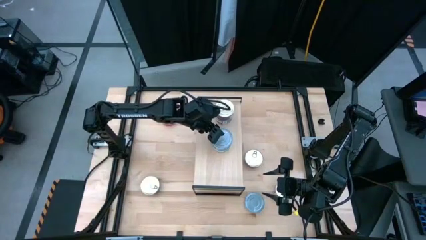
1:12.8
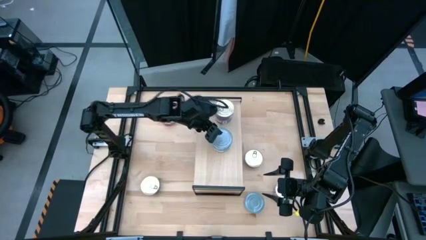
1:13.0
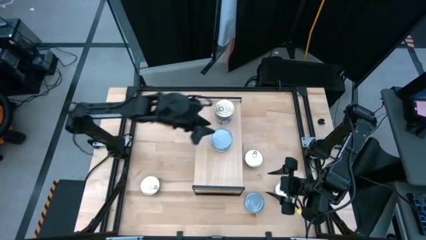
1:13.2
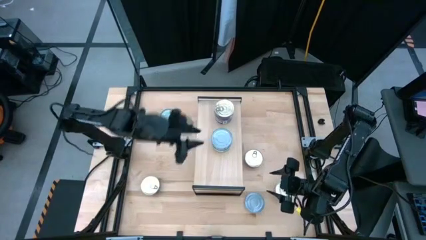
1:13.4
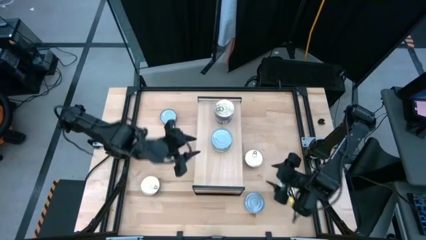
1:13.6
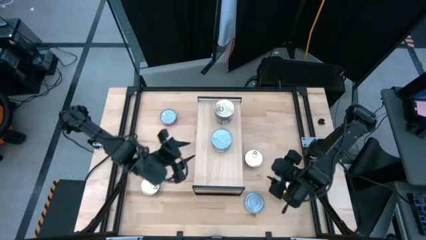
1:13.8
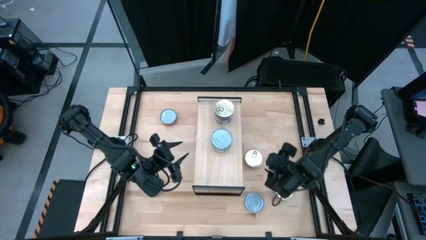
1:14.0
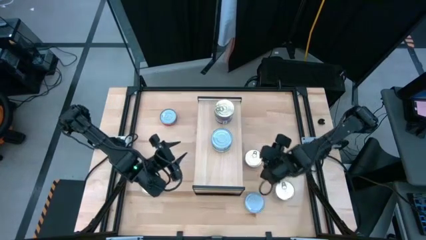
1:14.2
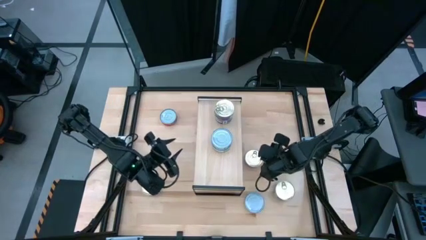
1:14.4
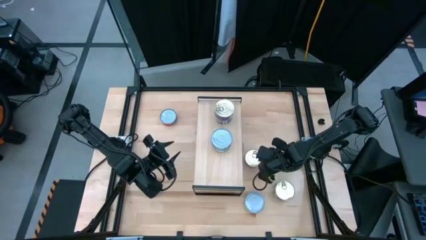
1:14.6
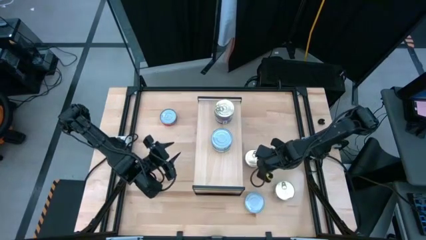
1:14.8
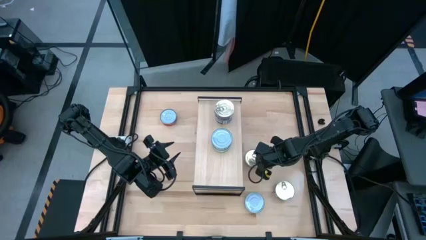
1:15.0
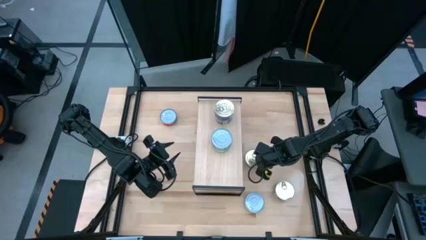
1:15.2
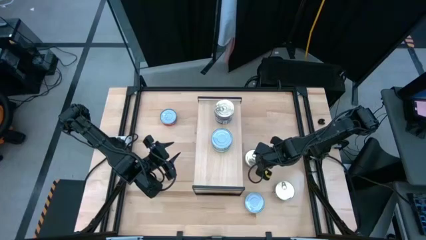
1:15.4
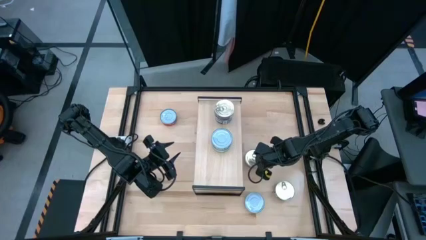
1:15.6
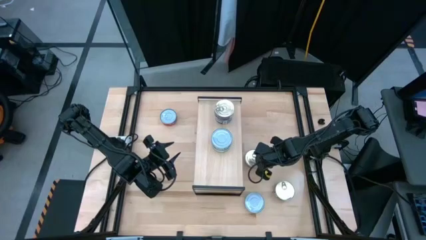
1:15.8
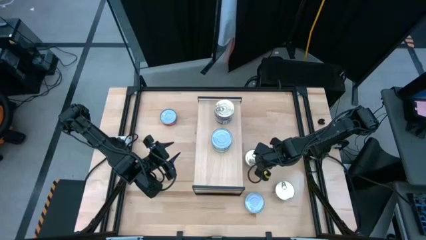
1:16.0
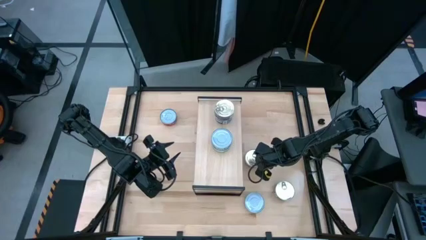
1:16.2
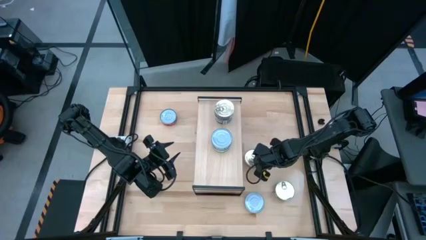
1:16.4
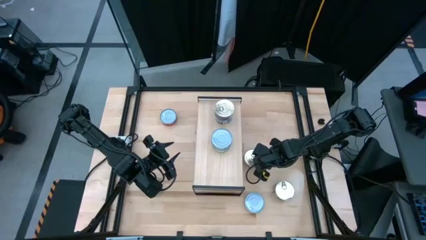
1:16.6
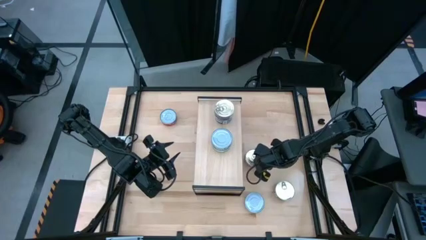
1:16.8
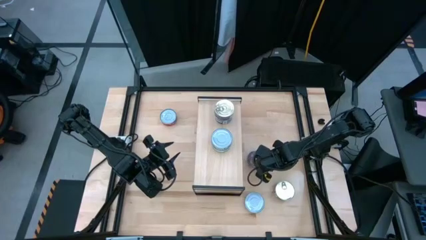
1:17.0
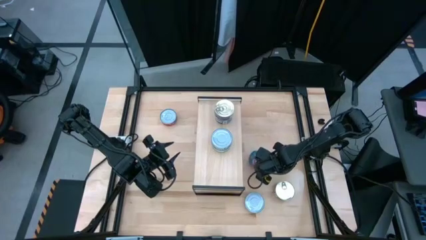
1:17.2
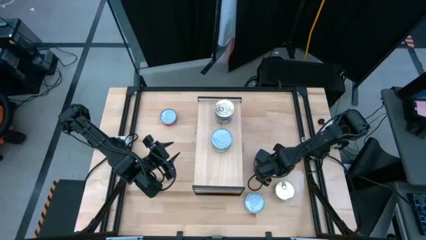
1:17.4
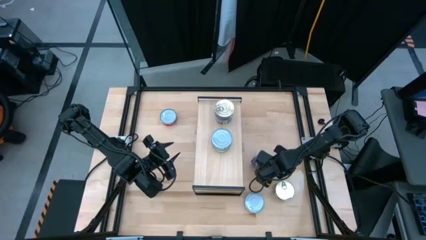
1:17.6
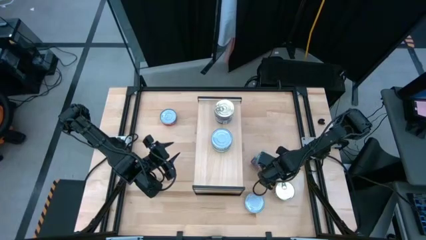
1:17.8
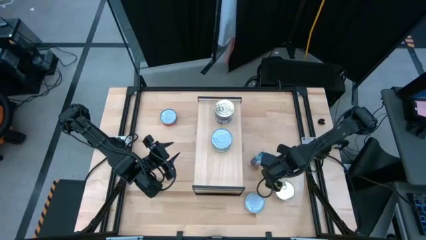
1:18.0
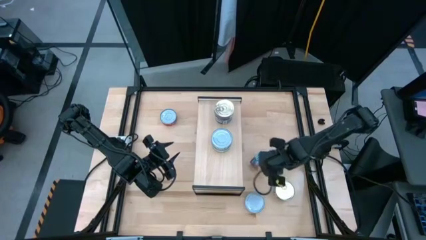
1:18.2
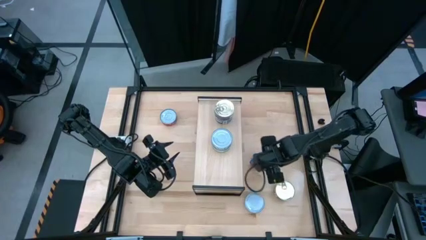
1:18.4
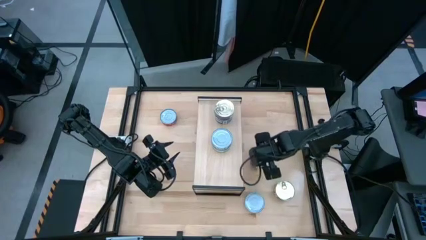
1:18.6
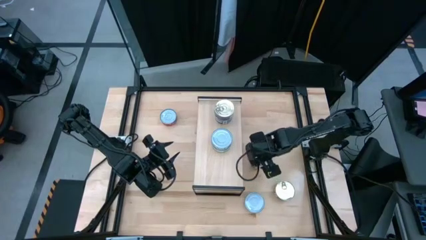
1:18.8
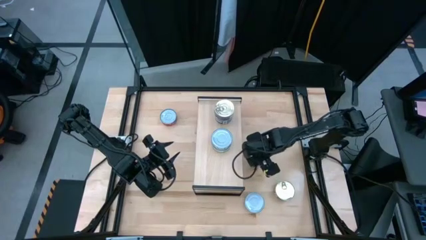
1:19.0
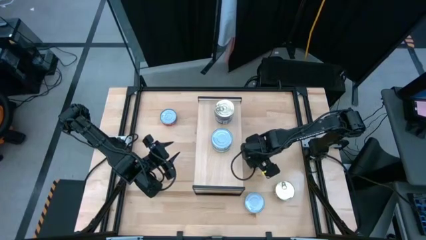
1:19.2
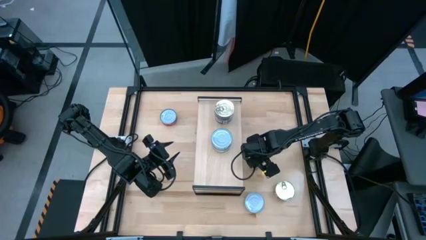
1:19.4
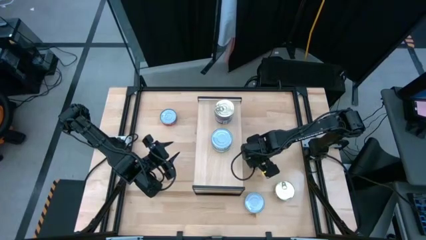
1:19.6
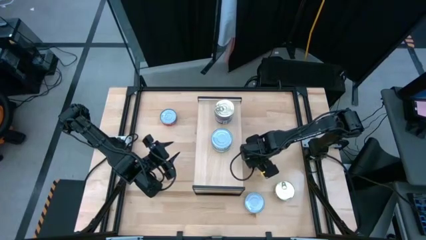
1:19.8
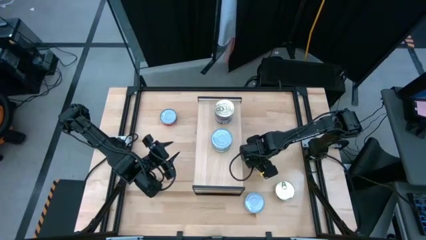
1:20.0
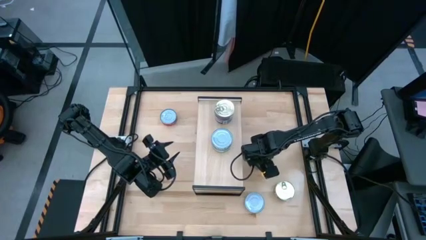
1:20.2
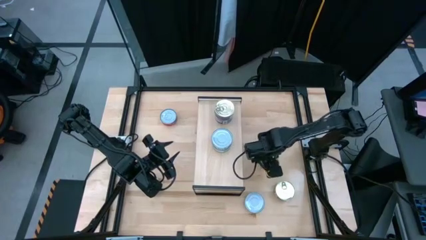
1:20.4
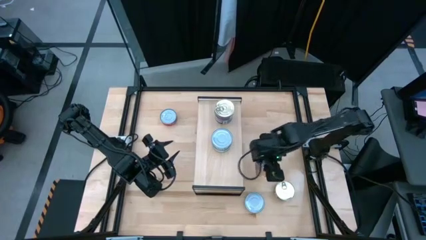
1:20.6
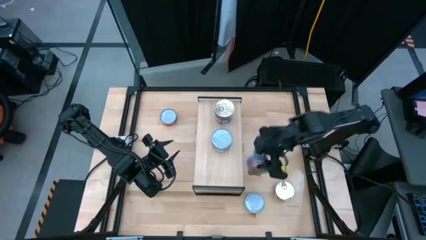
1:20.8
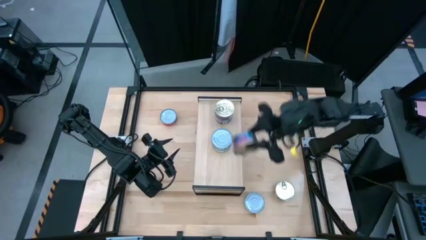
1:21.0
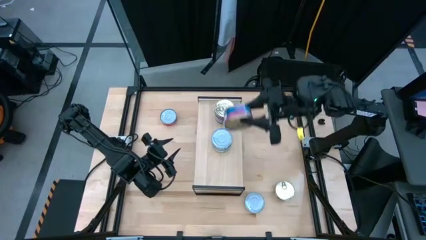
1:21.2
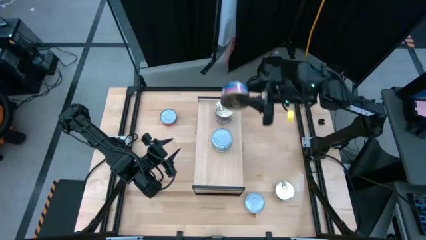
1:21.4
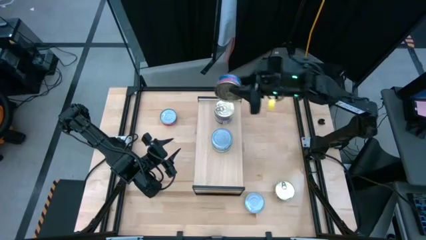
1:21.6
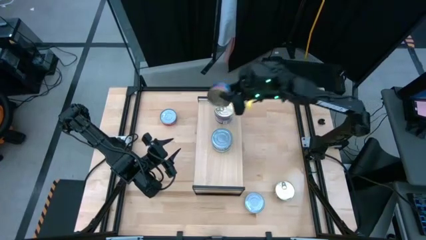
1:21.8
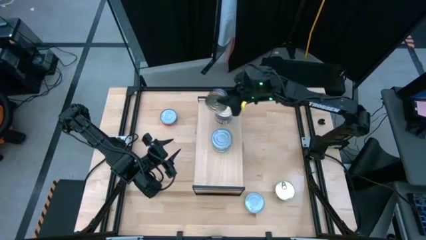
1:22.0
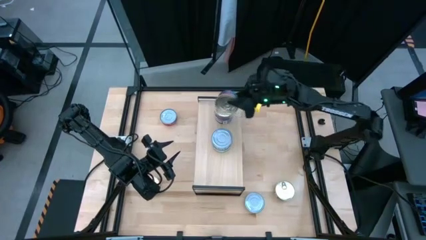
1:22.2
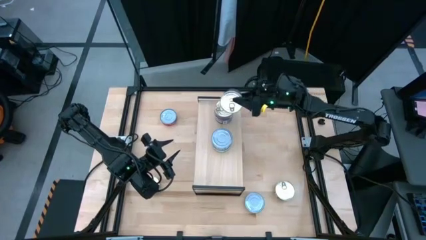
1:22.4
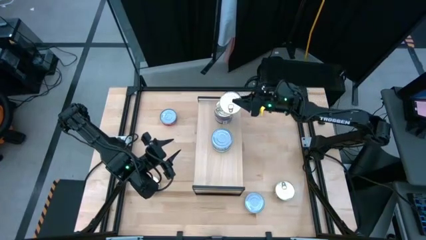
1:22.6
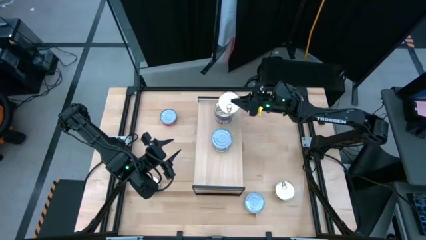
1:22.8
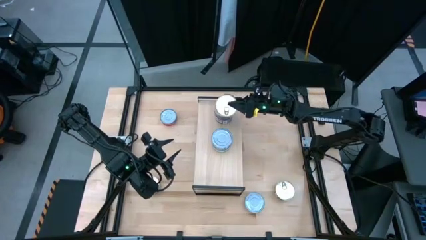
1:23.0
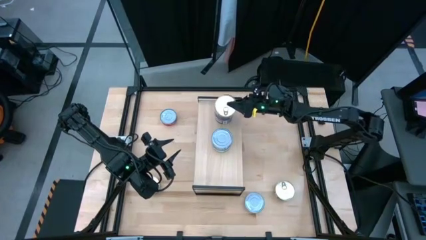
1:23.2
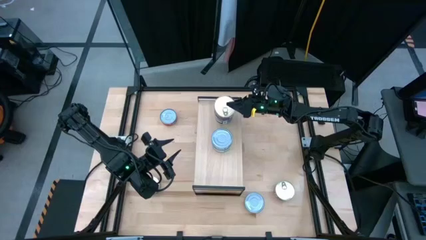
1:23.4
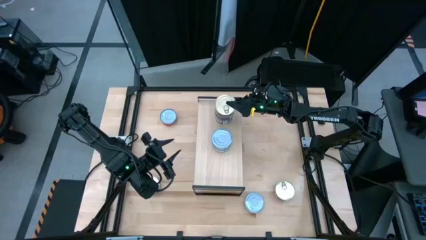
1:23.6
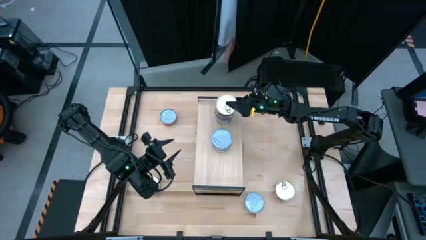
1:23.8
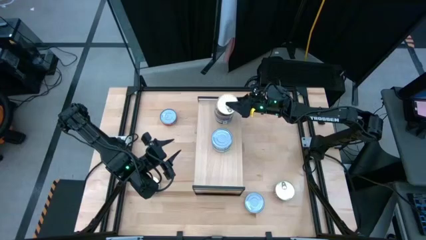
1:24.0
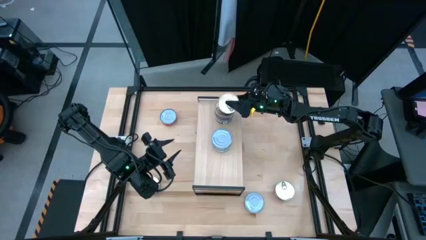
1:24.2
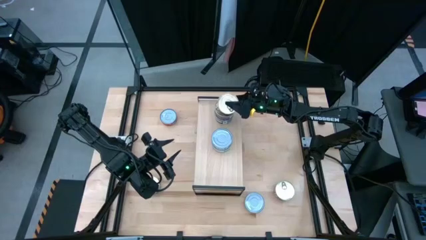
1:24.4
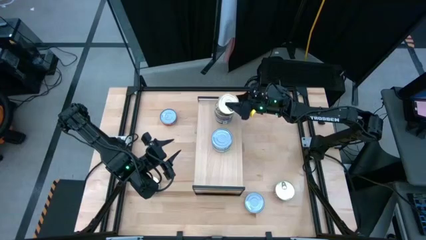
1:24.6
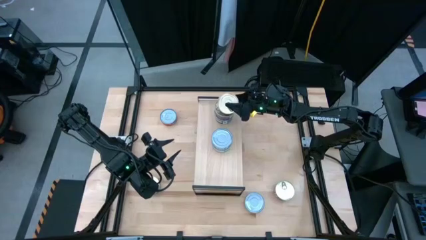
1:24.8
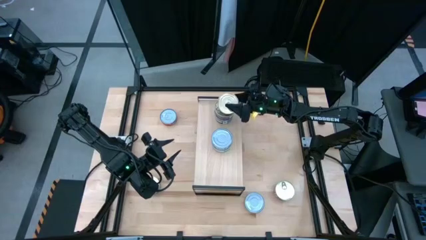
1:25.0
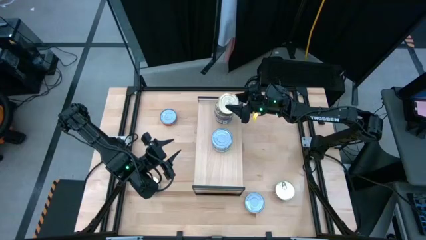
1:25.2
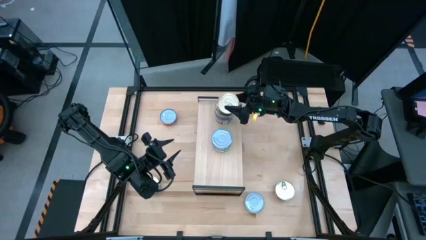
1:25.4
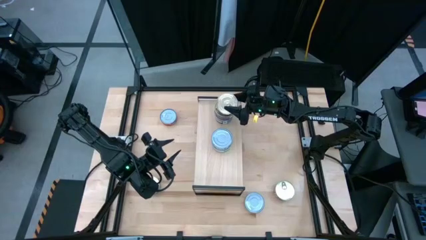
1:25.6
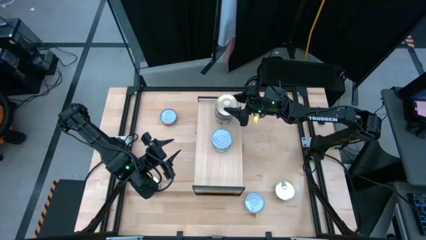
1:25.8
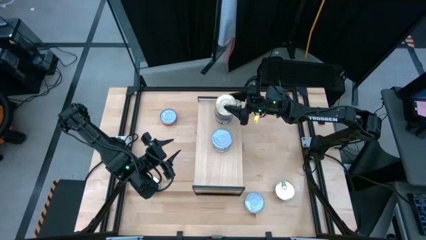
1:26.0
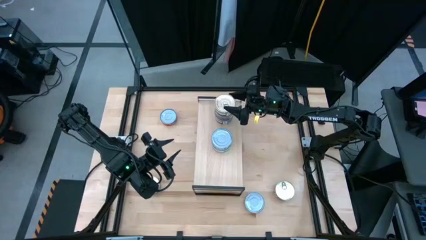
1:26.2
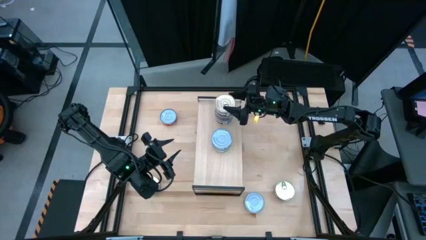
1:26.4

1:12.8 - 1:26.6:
Task: Stack canned seafood by type on shelf
Stack the blue pink tuna can on top of the stacked blue pink tuna can on the shelf

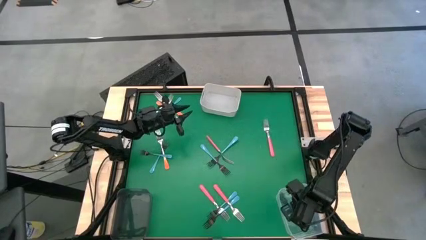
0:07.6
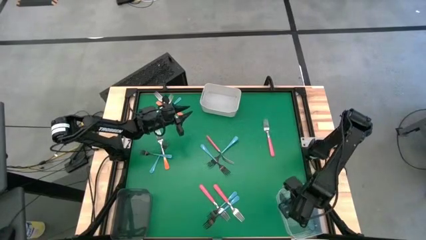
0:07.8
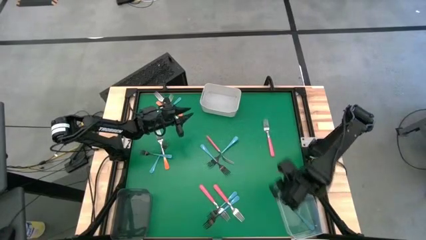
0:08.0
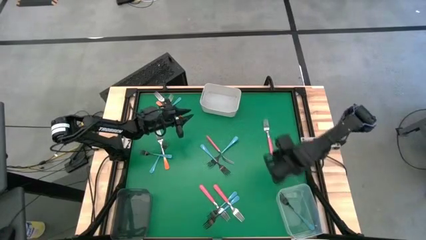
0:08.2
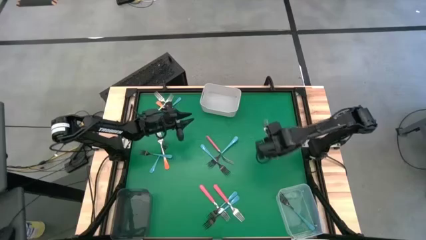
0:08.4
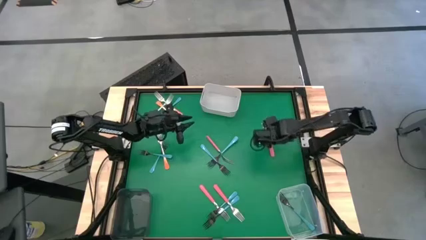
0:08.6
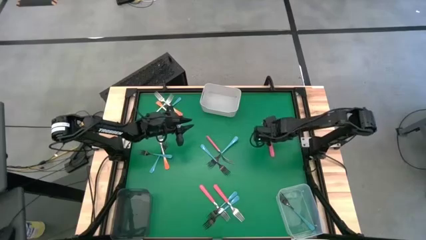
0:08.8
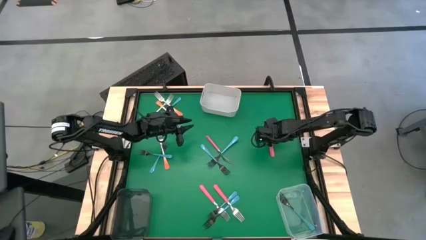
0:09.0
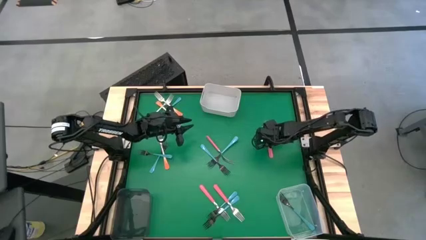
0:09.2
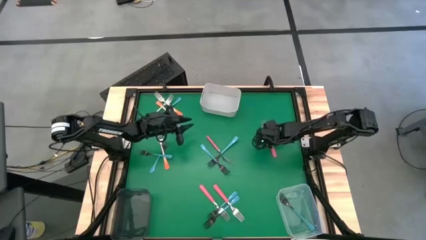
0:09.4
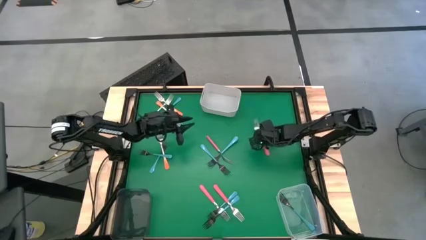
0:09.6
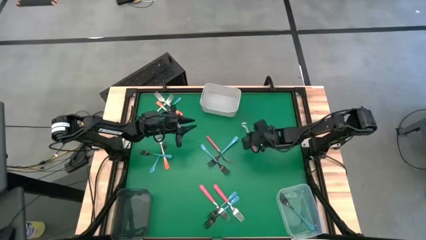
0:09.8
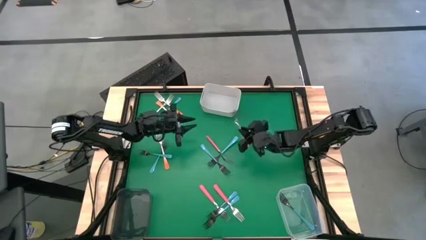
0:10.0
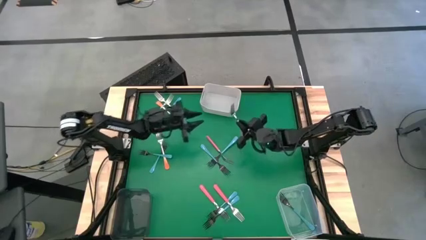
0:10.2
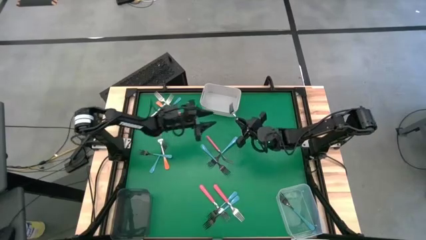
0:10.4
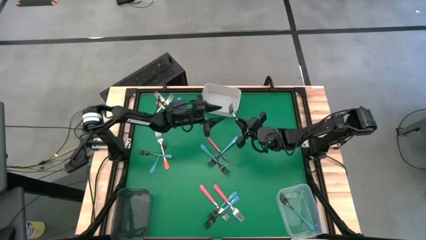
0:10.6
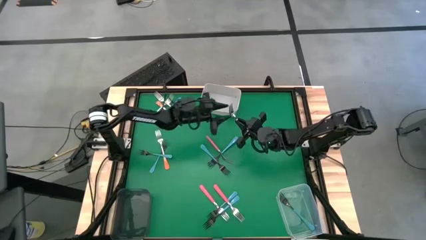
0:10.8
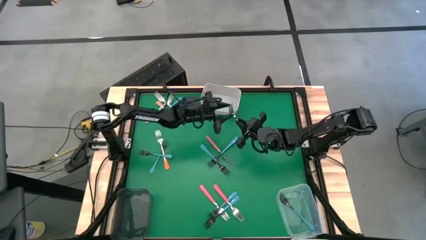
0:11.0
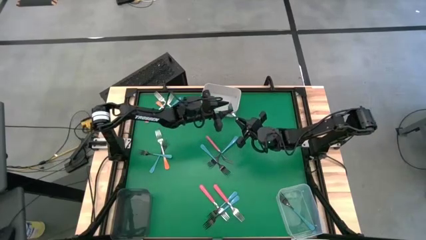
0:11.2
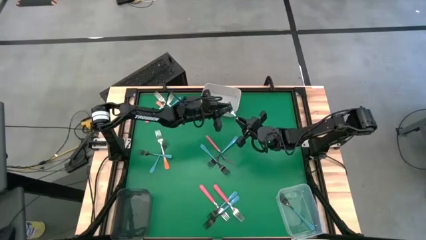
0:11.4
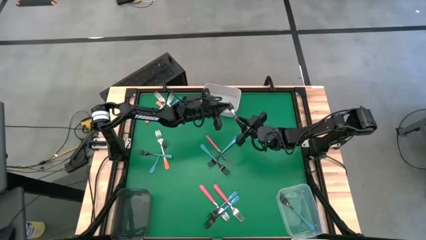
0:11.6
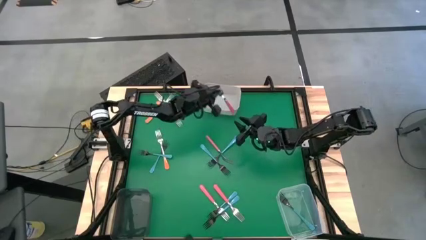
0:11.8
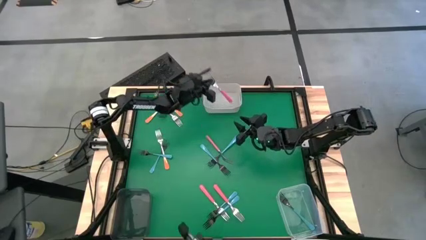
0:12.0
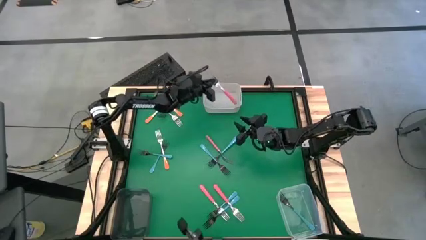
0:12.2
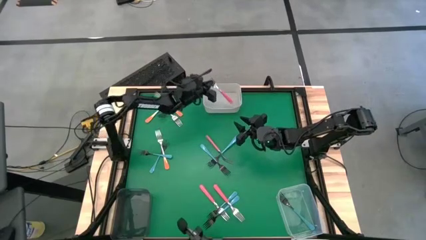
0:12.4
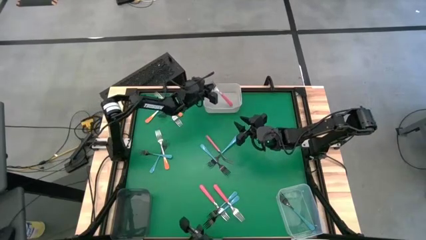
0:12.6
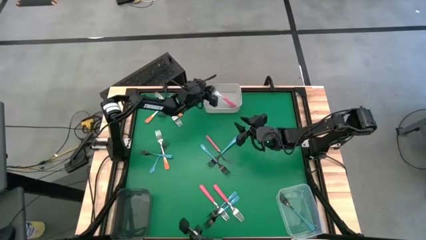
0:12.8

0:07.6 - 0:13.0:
Task: Sort silverware by color (type)
Put the pink fork into the white bin
